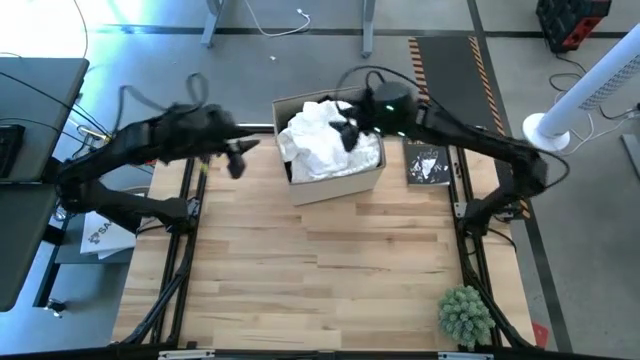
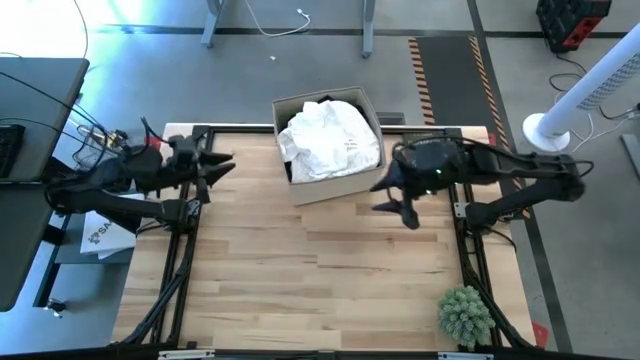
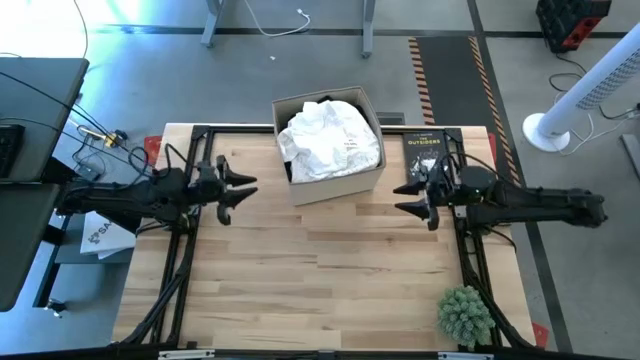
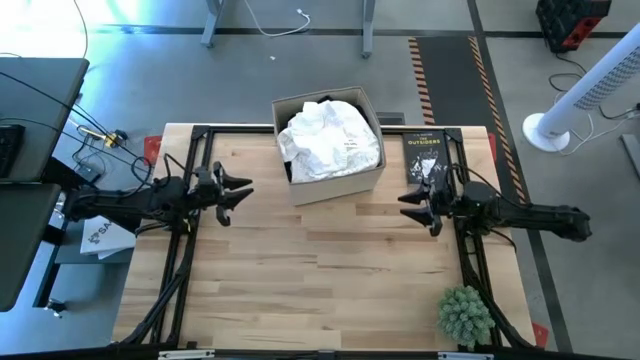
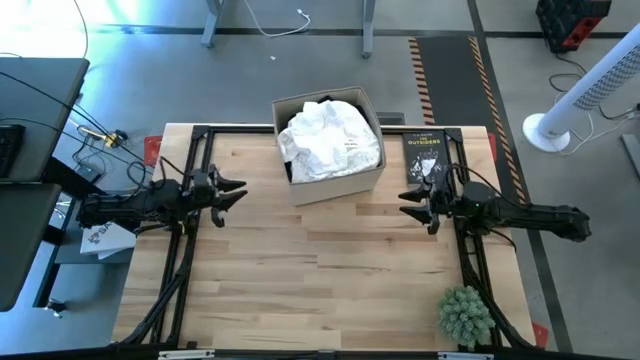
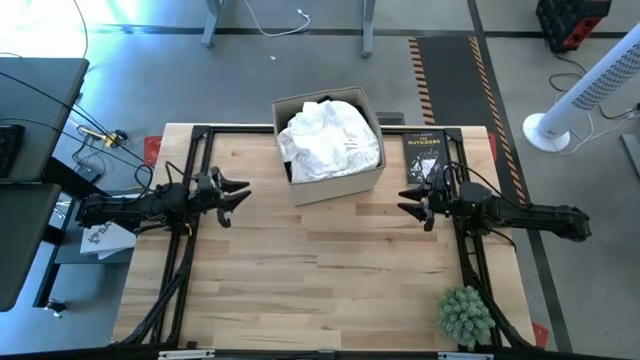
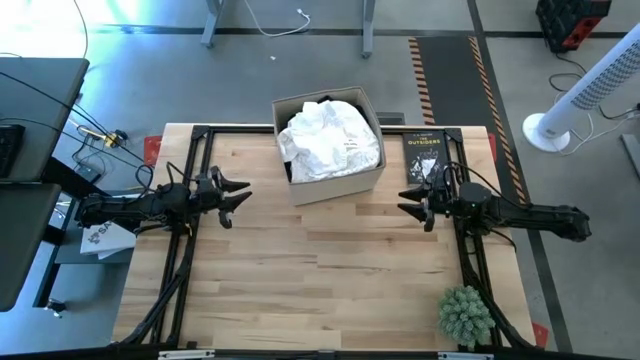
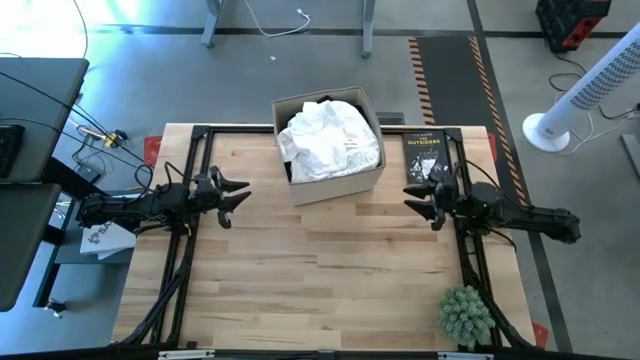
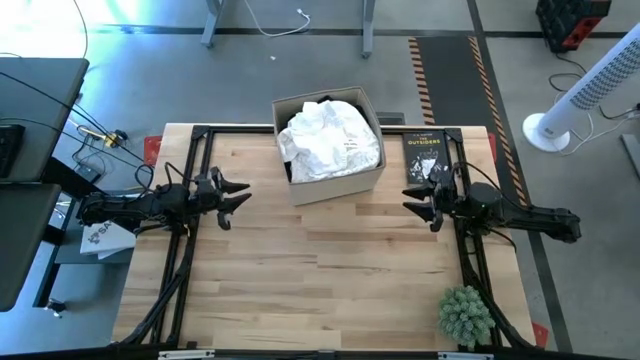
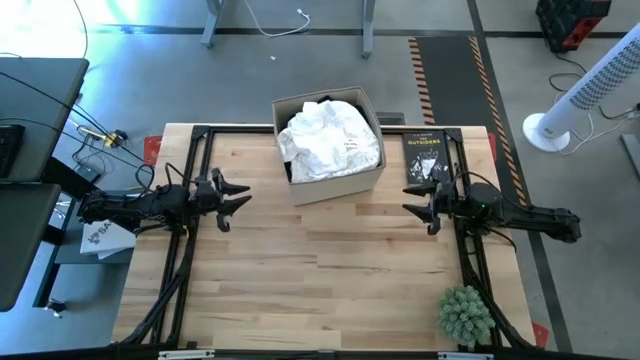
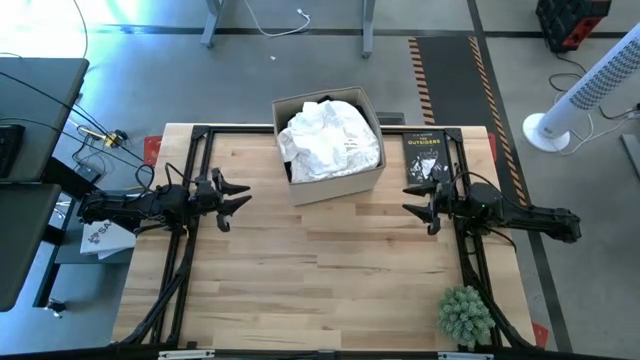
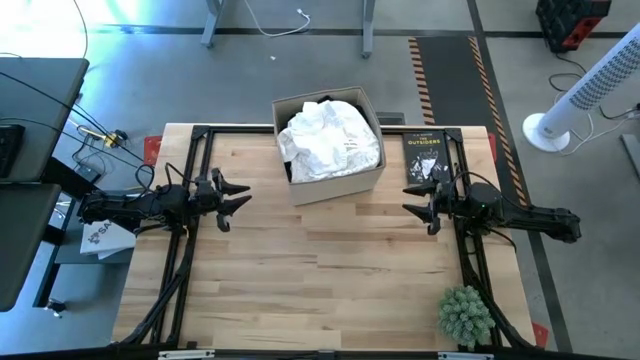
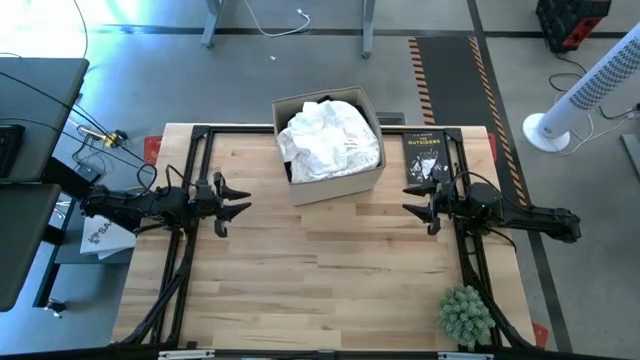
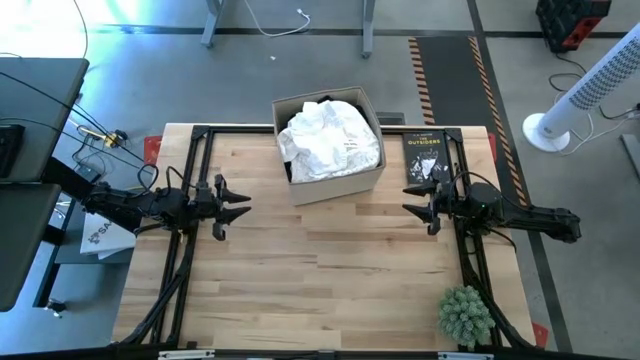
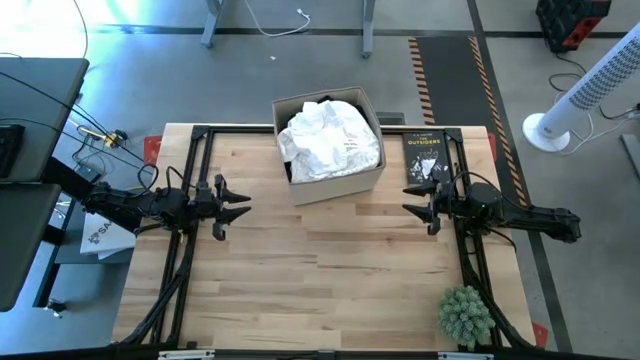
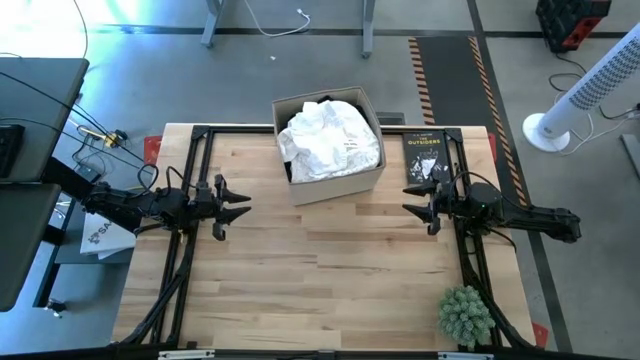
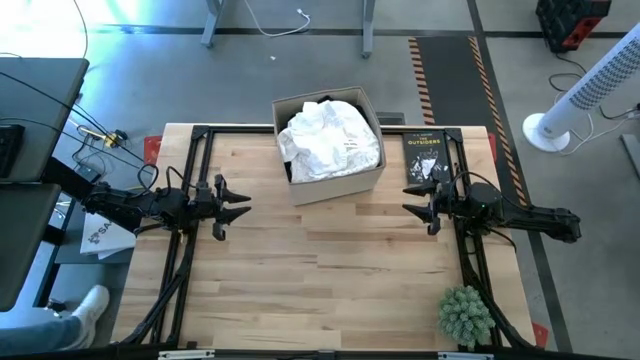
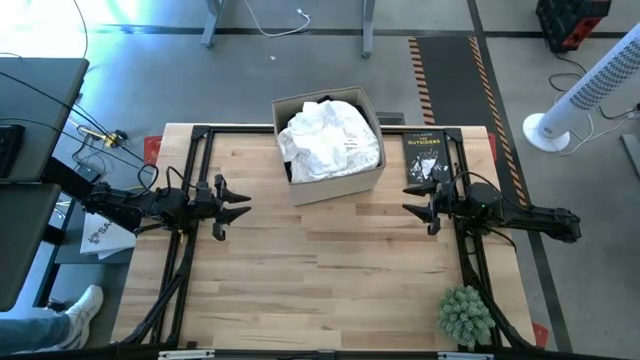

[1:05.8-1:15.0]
Task: Sort clothes
Return to Home Position

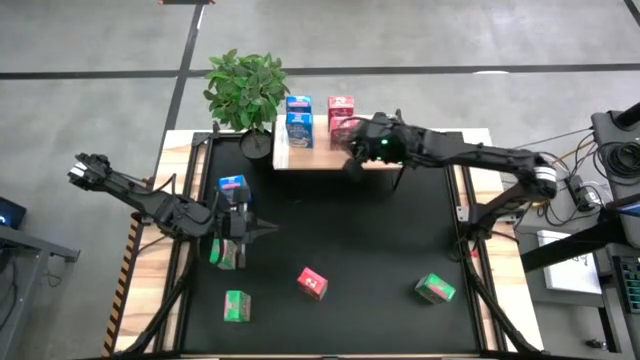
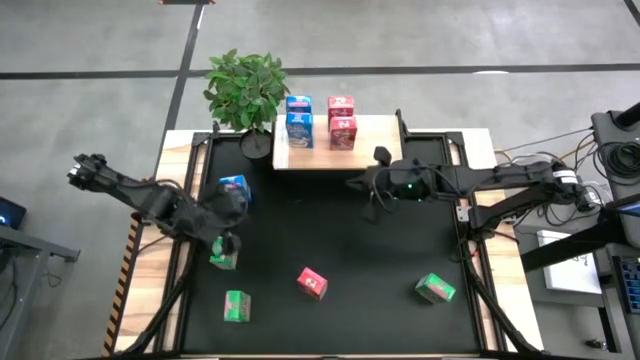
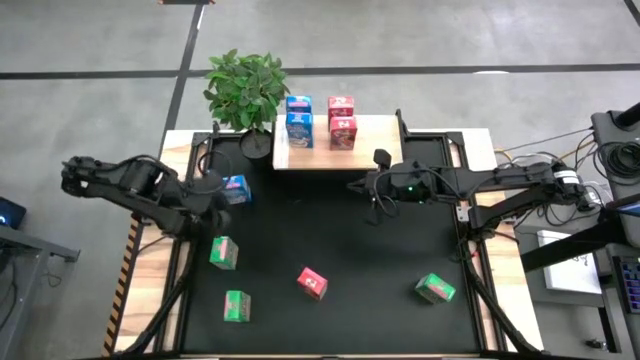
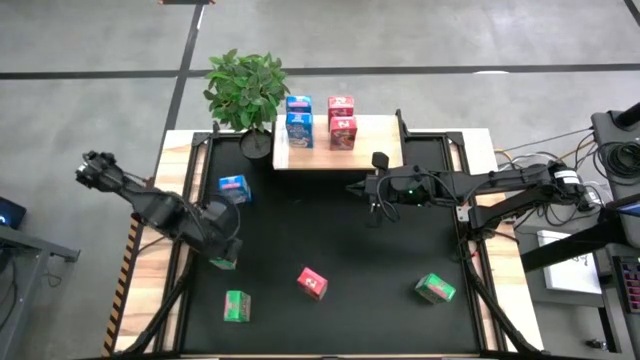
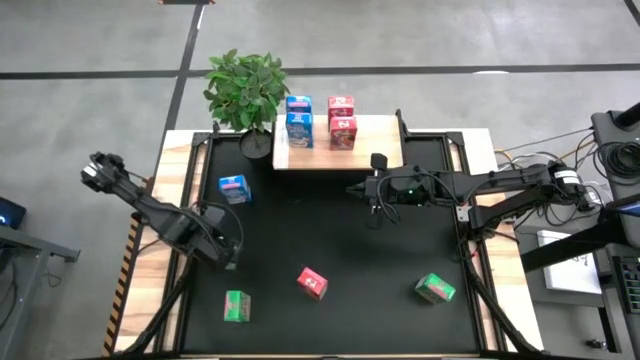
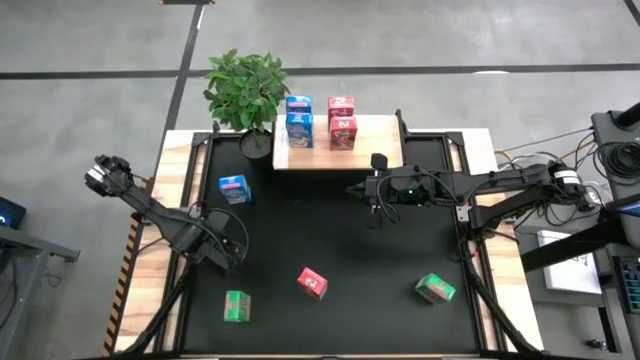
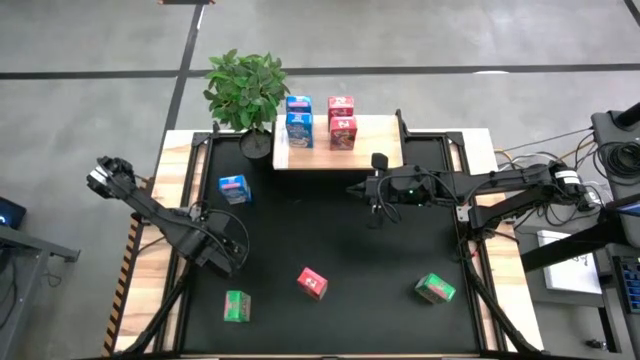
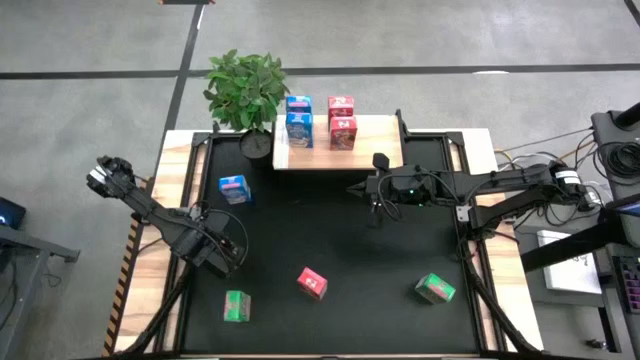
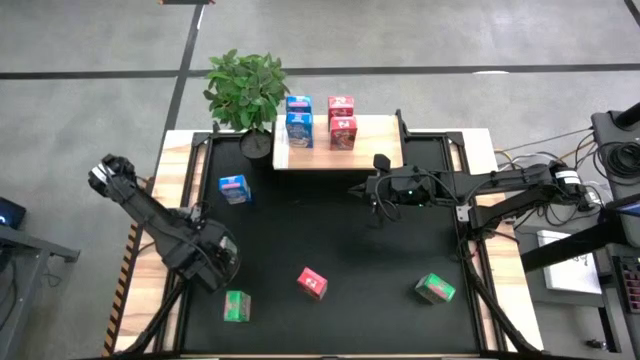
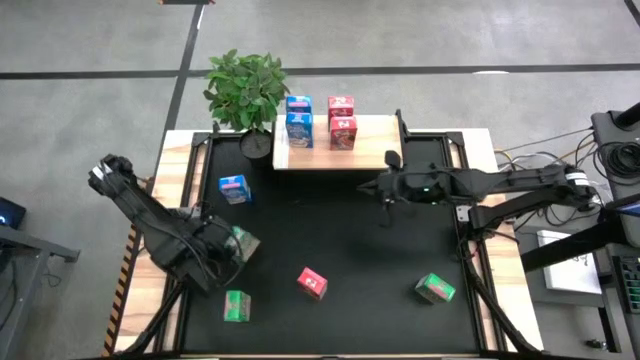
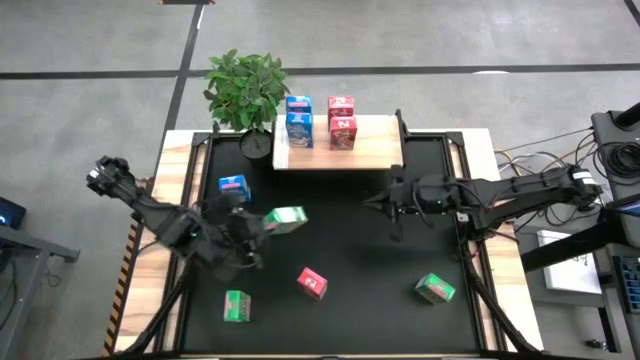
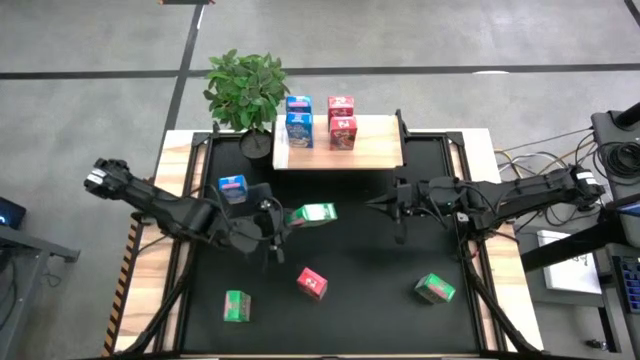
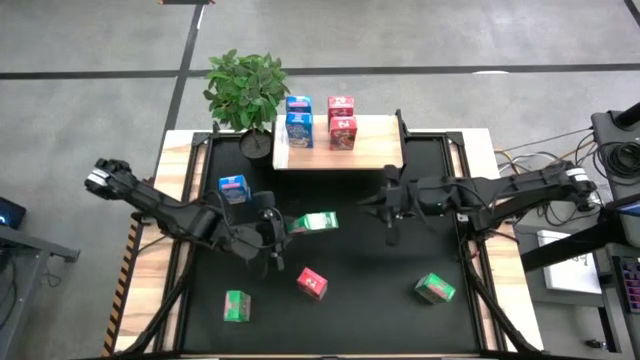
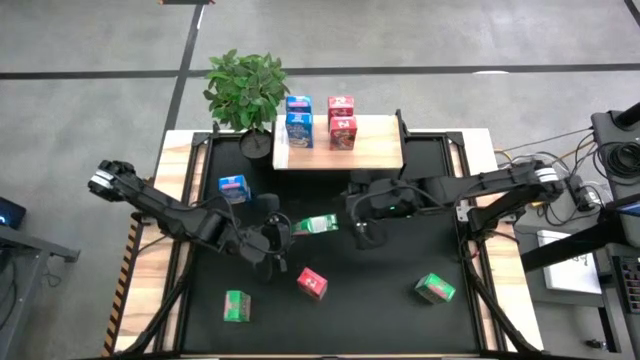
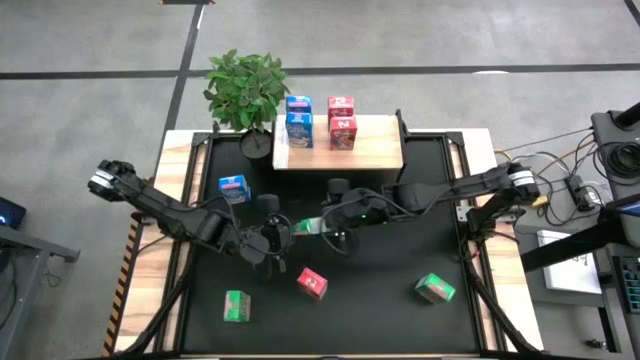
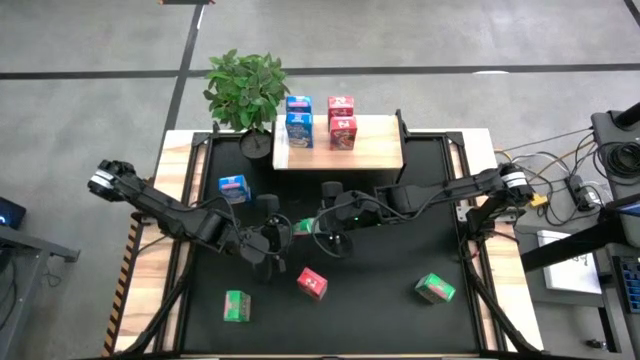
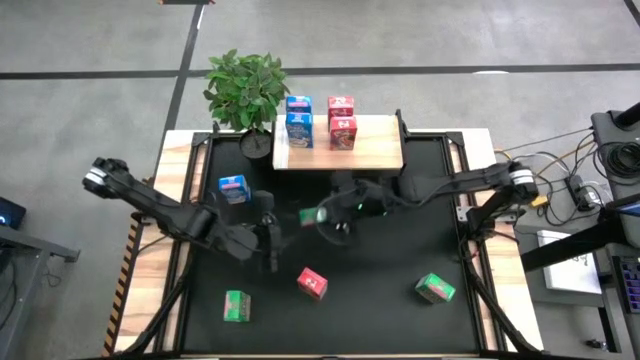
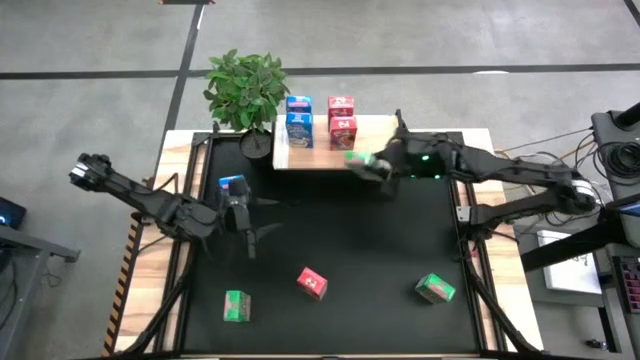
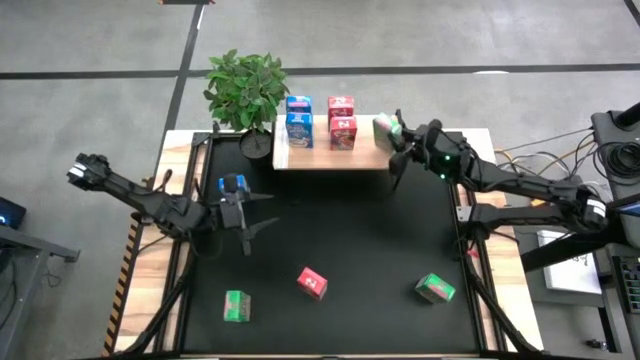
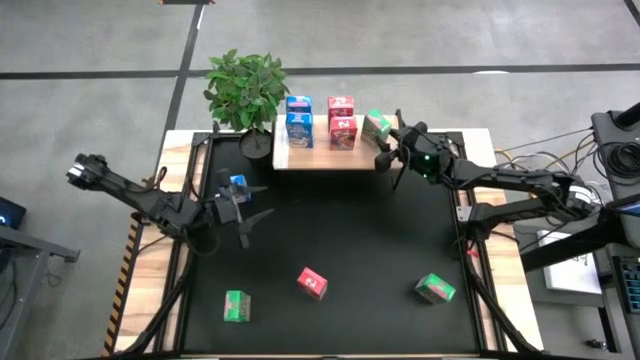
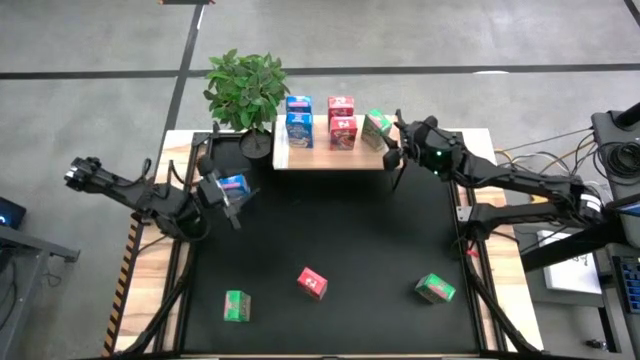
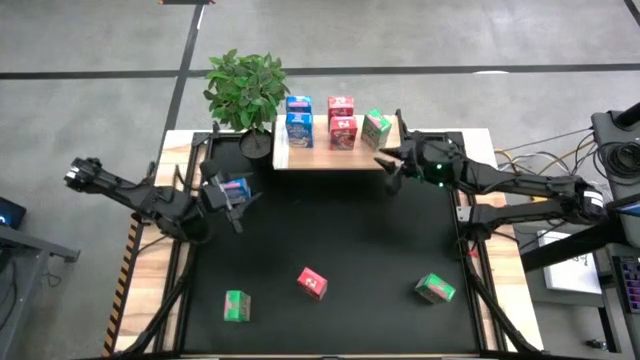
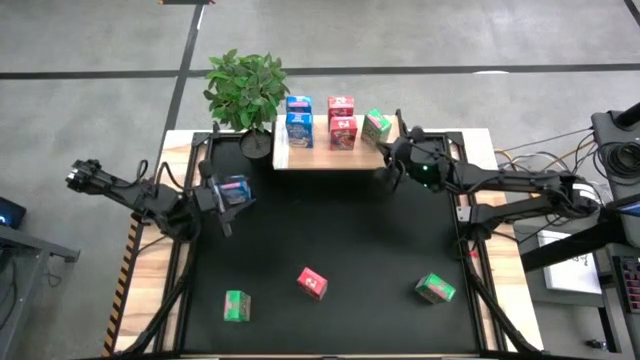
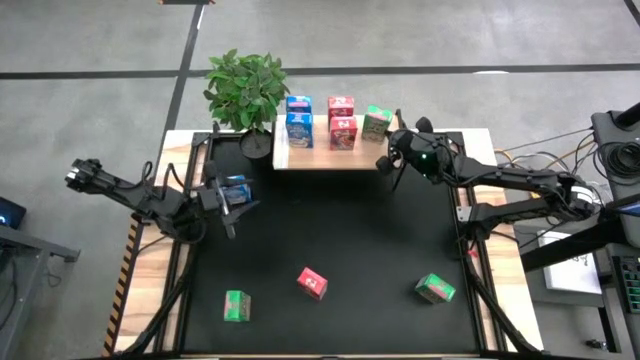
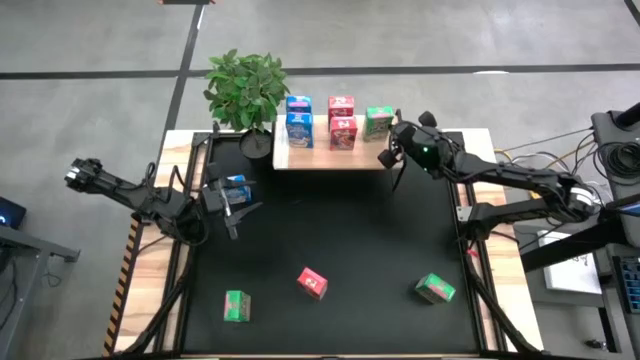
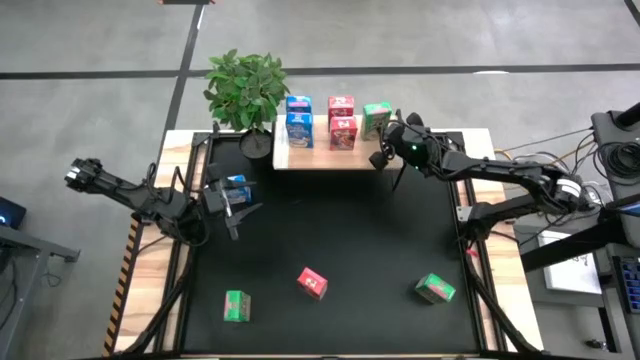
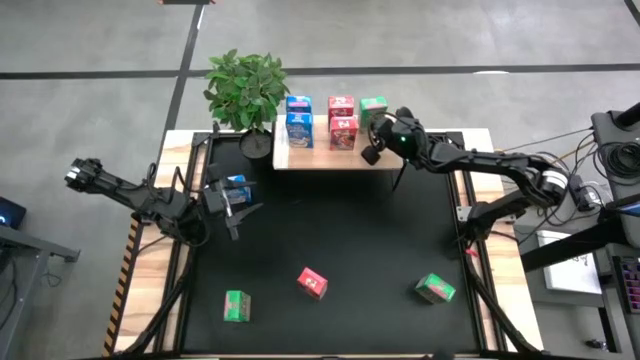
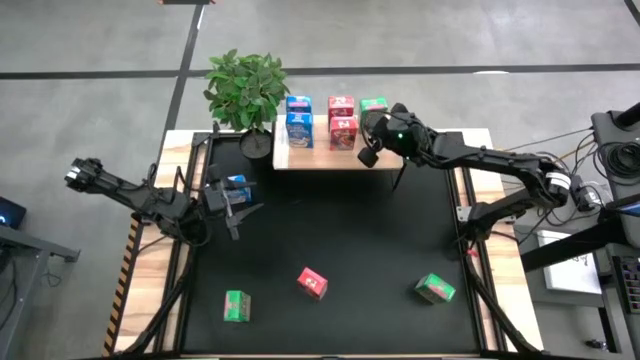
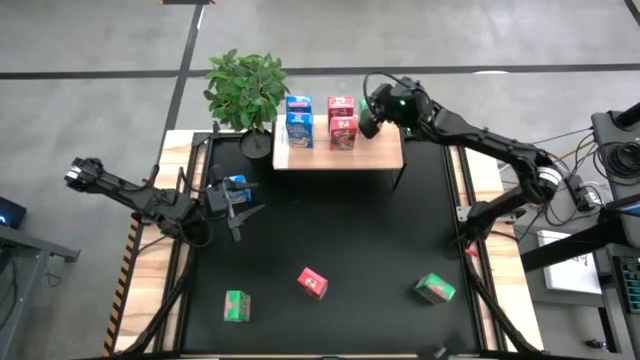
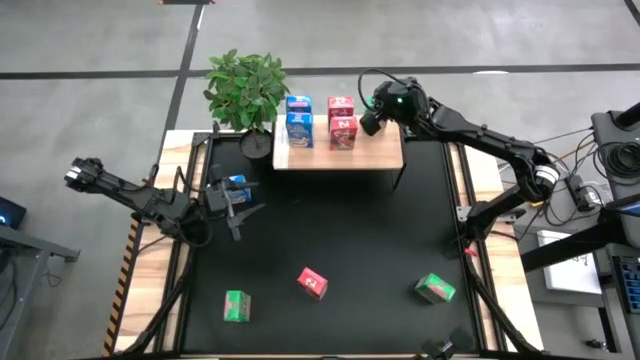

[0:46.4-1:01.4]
Task: Stack cereal on shelf
Put the top green cereal box on the shelf
